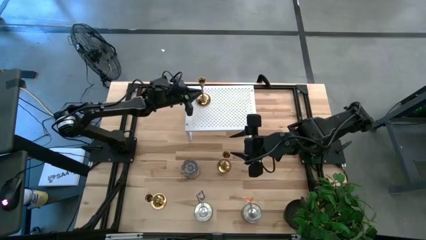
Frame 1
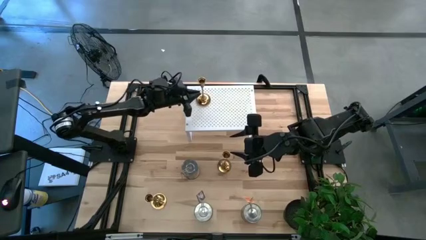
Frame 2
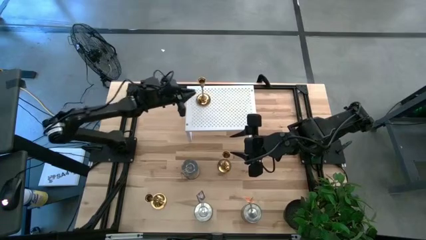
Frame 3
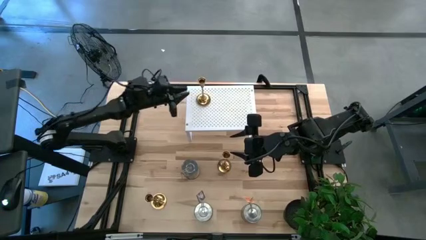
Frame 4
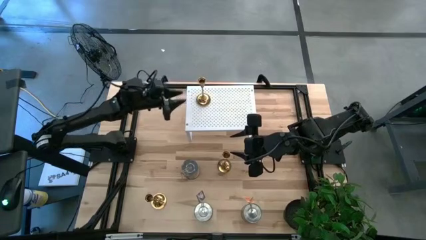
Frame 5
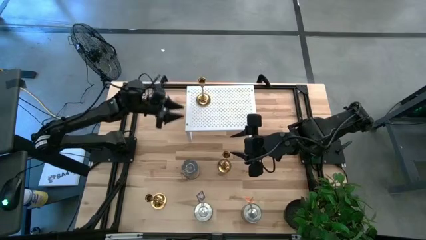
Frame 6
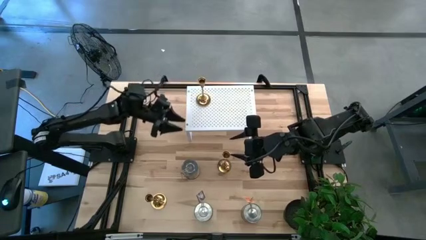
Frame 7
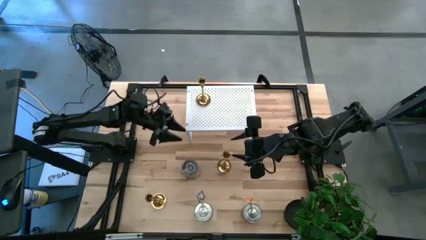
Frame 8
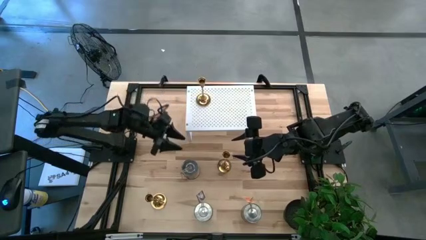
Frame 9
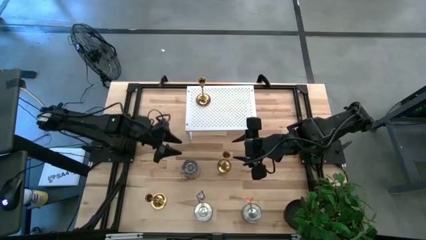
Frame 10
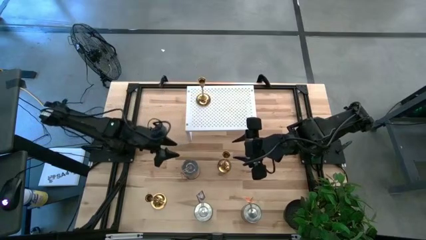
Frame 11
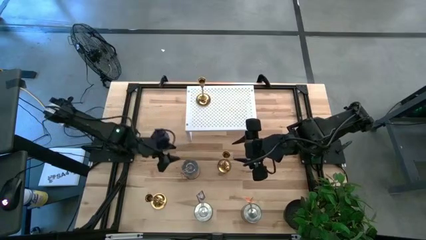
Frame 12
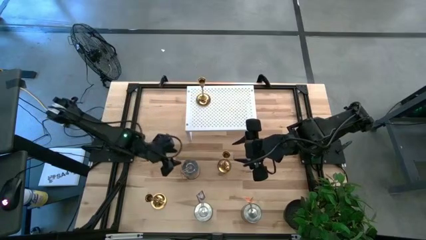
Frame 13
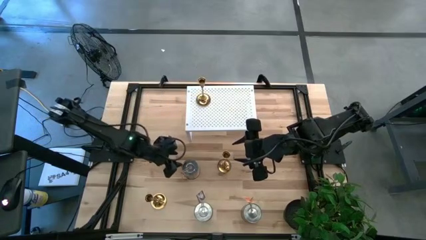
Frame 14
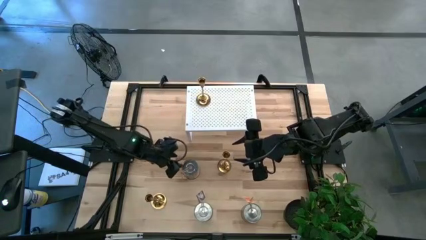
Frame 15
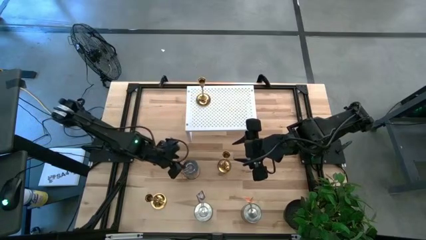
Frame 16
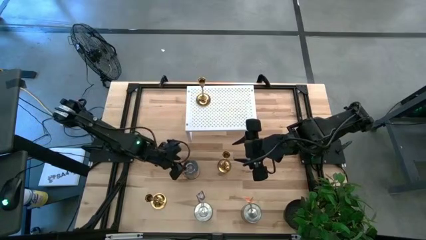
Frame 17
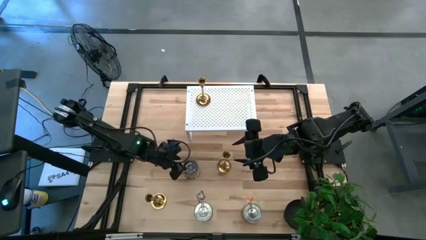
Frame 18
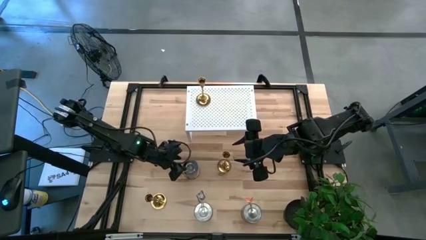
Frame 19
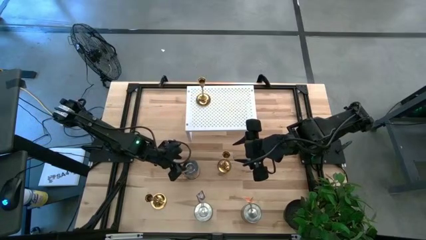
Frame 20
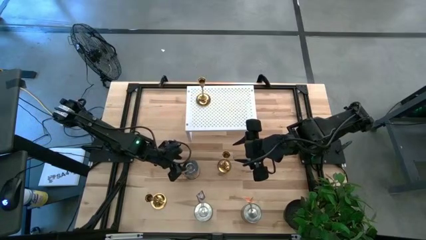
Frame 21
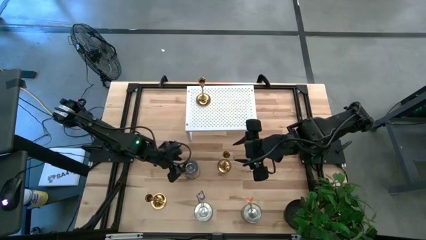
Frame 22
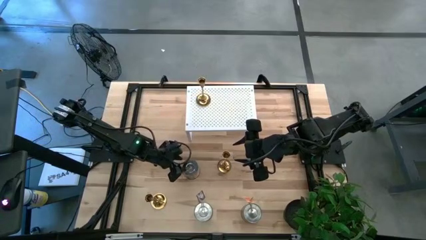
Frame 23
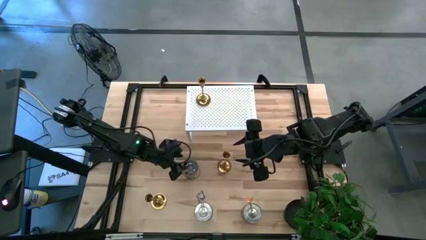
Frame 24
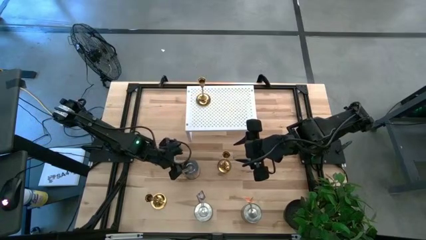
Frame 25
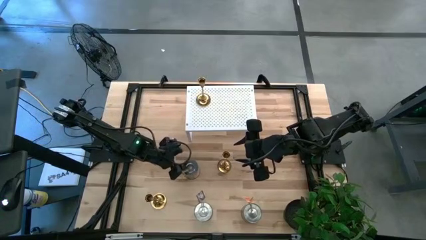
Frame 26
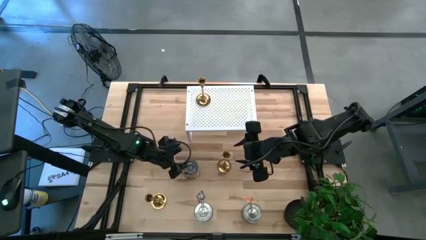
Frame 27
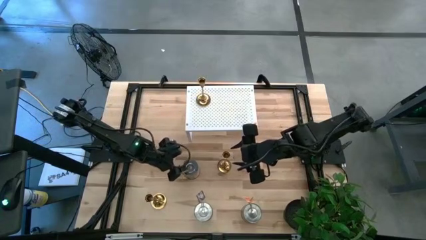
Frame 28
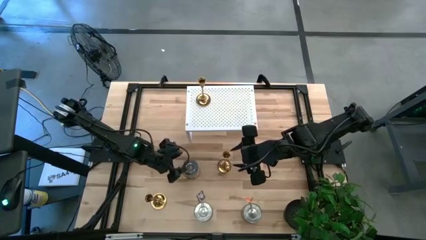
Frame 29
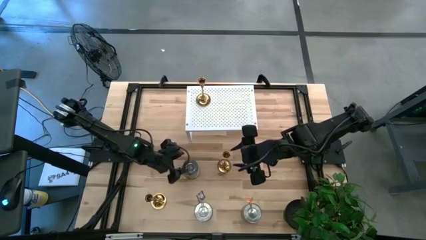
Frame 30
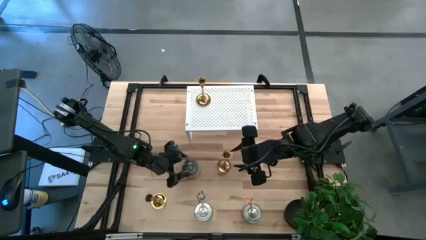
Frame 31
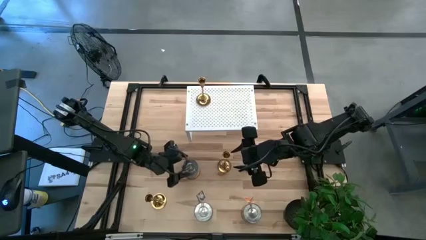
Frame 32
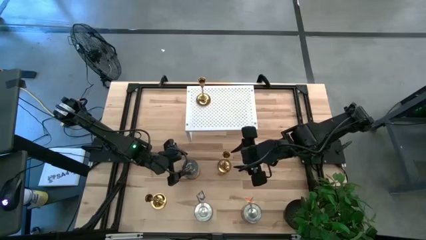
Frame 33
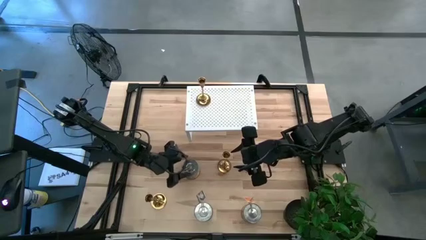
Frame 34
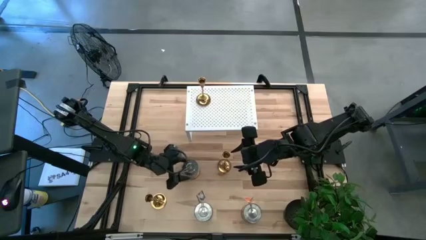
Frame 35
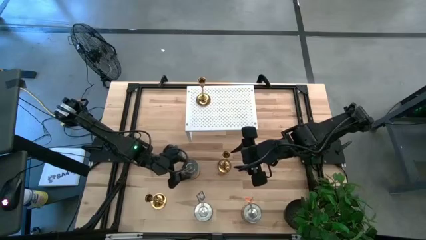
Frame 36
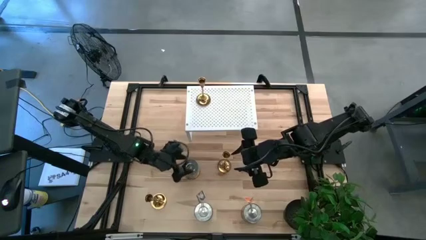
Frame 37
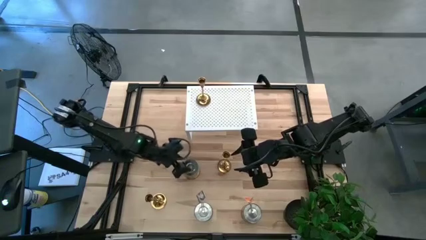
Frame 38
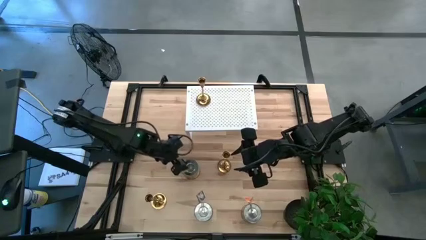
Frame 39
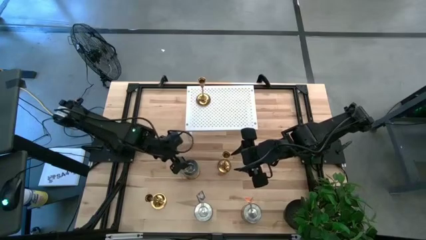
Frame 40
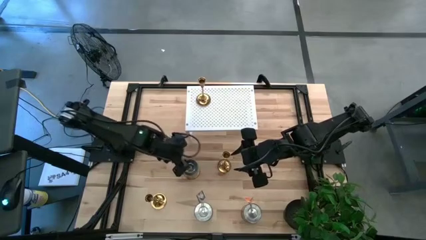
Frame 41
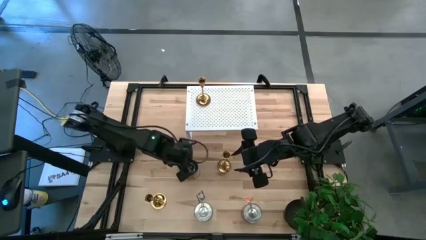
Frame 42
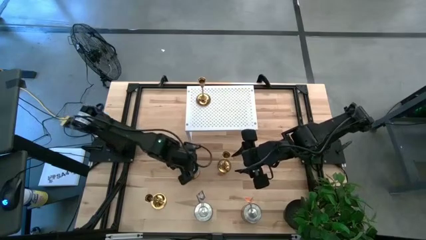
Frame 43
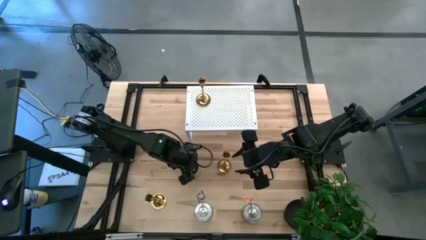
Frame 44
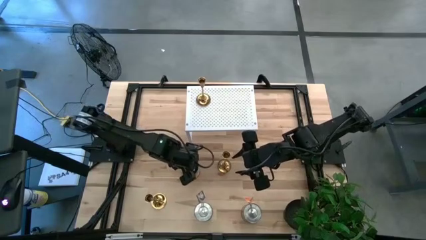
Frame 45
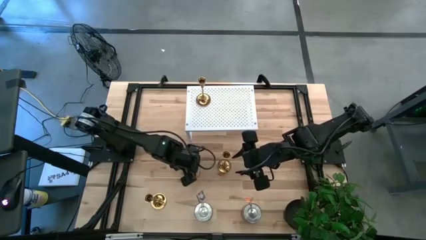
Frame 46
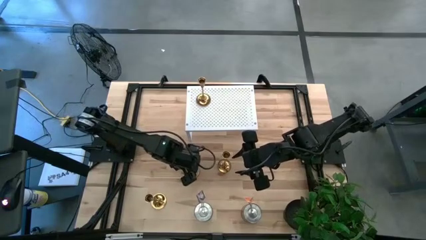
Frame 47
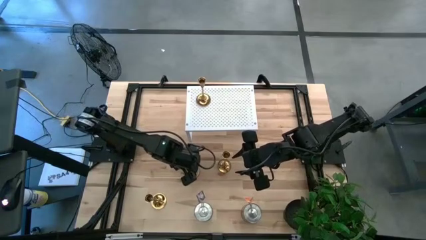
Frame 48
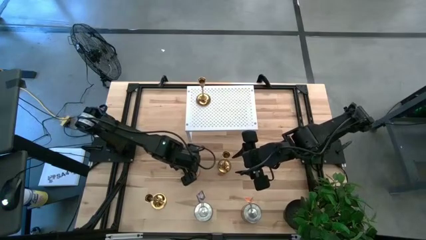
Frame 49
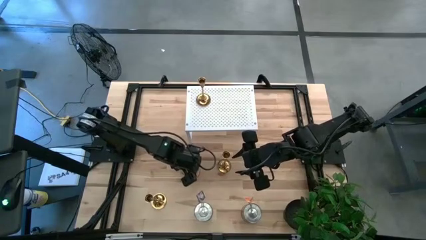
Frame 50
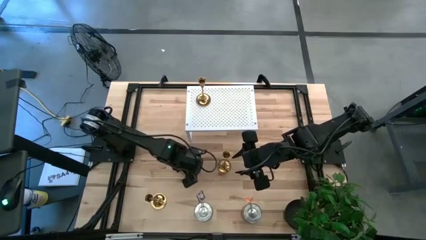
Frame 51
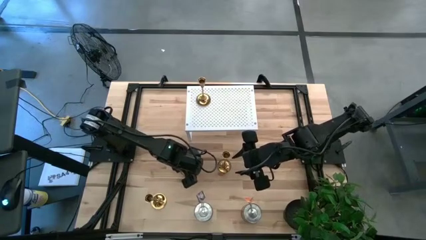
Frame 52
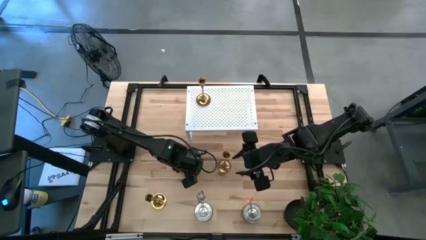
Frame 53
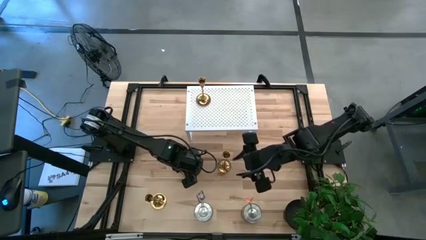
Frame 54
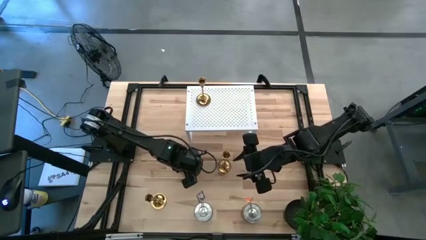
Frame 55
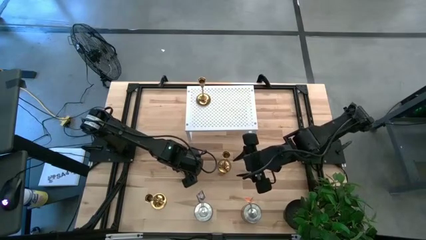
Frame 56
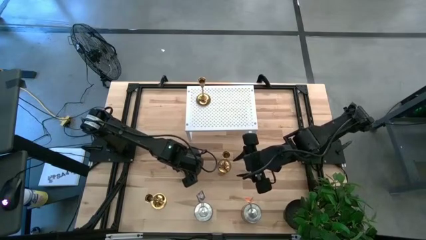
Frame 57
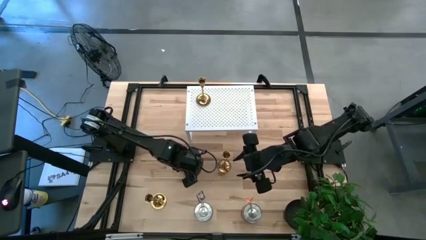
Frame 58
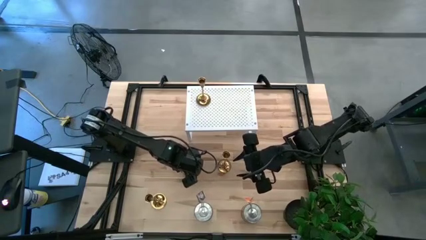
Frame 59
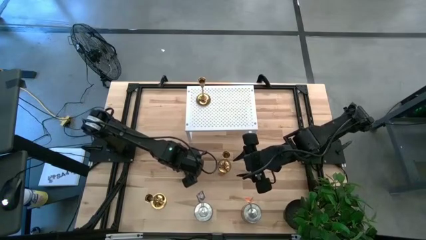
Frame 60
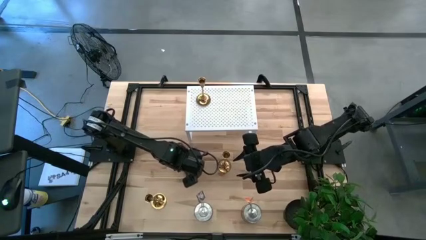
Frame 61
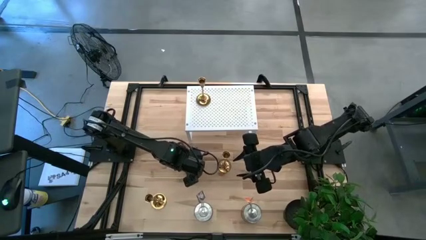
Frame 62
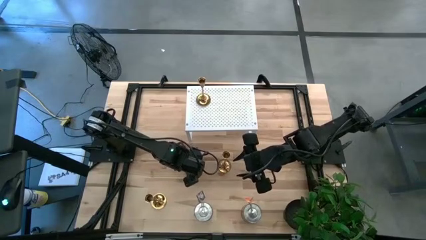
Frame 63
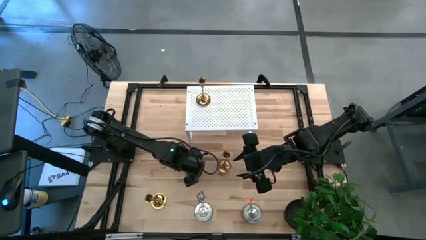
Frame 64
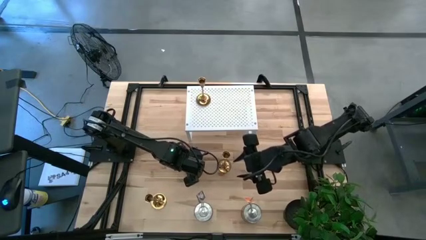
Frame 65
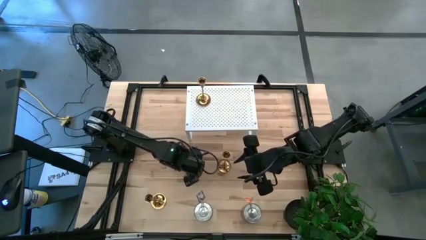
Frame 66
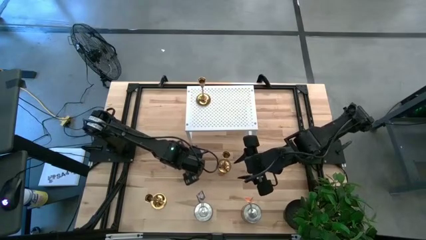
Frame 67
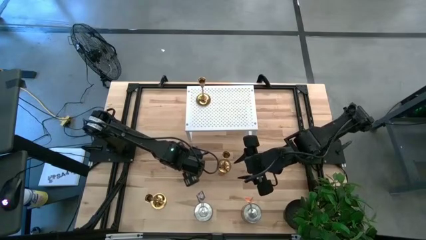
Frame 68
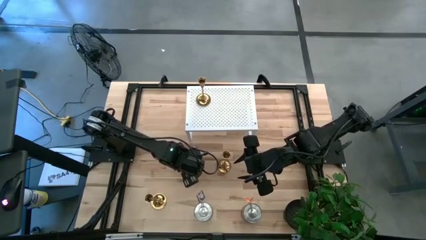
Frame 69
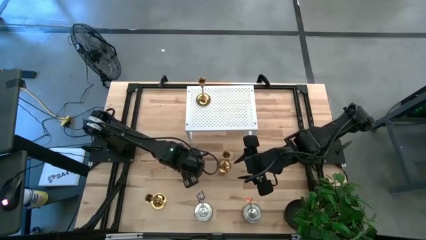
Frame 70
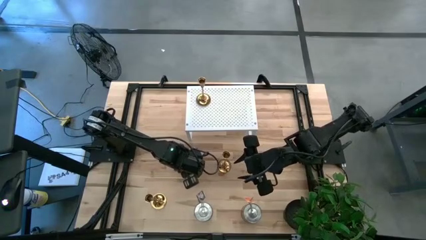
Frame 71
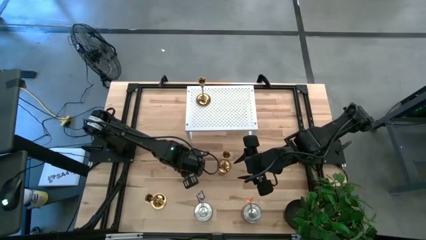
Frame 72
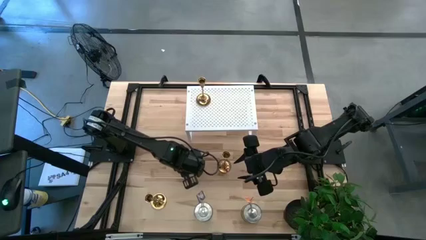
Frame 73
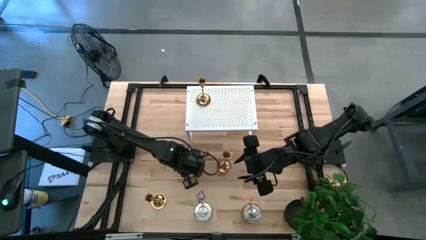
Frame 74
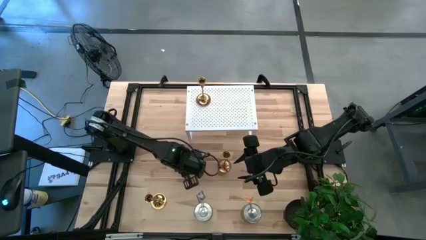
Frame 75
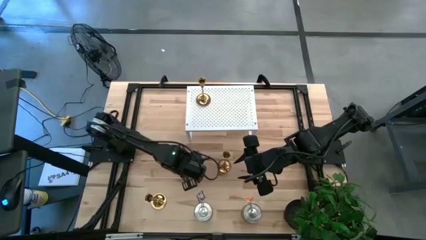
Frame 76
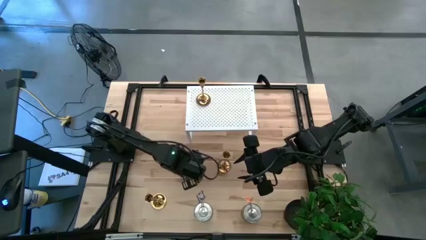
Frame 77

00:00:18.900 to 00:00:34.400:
Task: Pick & Place candle stick holders
Put the top left silver scented candle on the shelf
